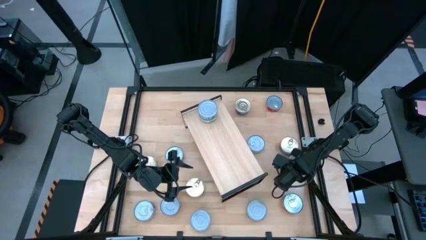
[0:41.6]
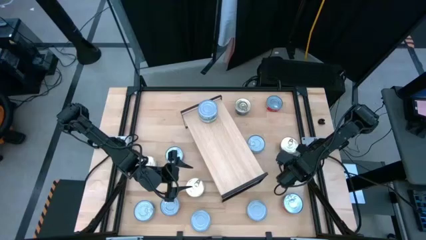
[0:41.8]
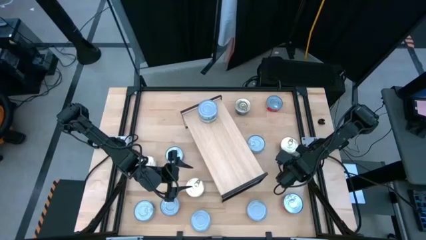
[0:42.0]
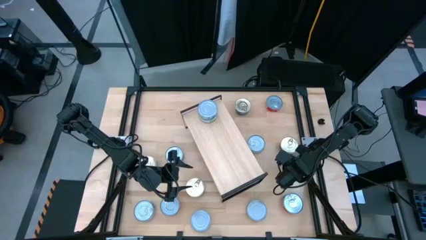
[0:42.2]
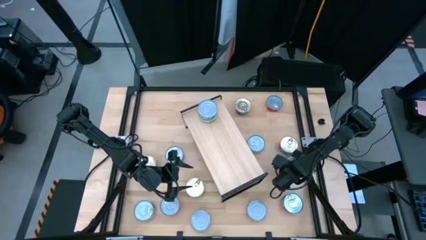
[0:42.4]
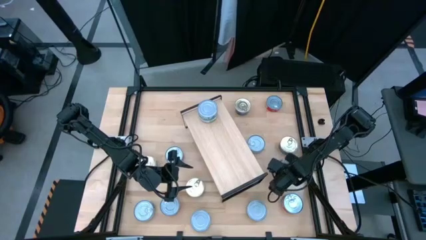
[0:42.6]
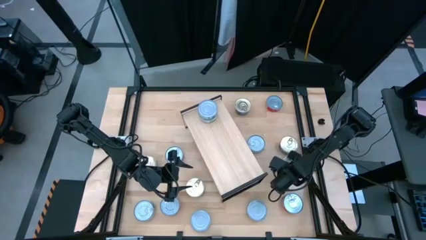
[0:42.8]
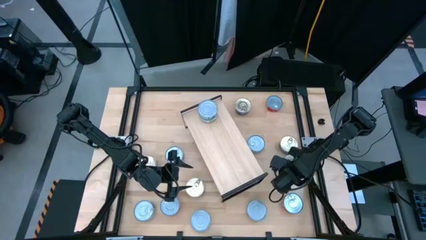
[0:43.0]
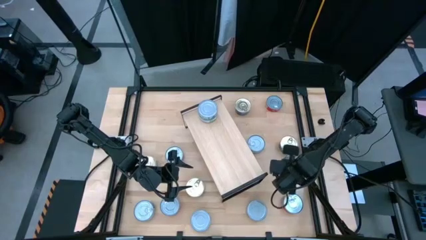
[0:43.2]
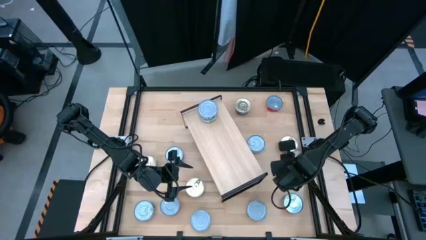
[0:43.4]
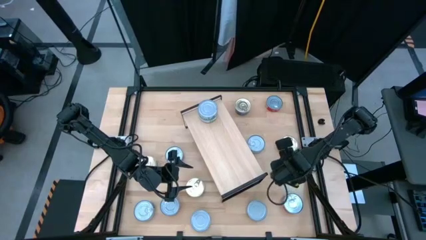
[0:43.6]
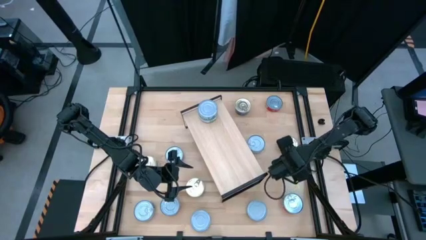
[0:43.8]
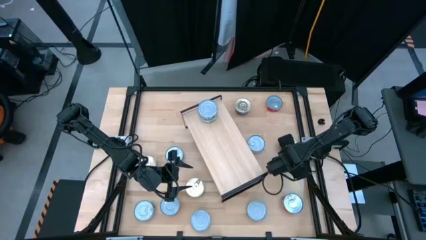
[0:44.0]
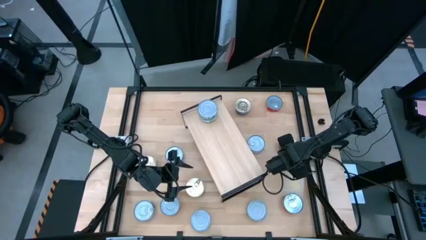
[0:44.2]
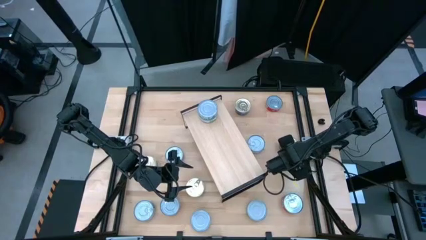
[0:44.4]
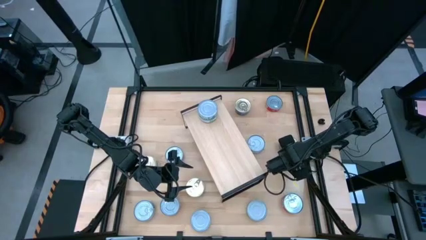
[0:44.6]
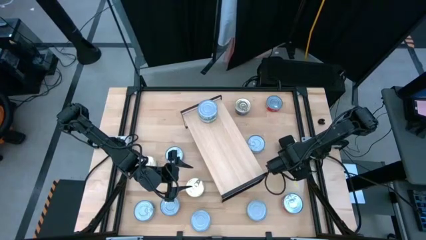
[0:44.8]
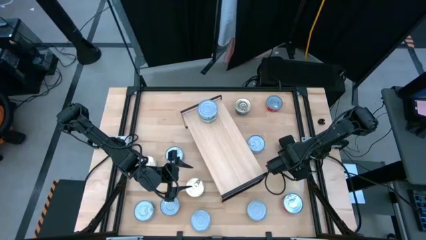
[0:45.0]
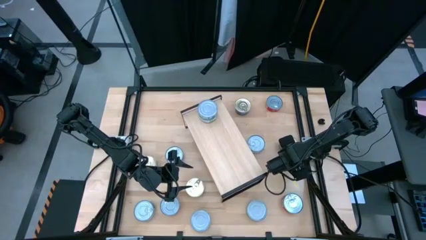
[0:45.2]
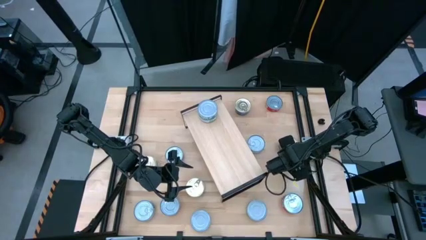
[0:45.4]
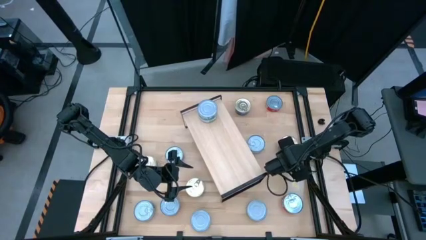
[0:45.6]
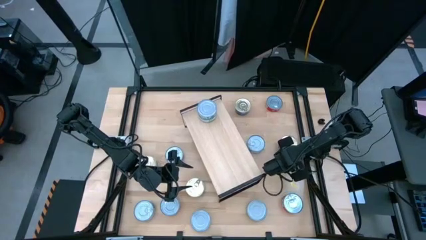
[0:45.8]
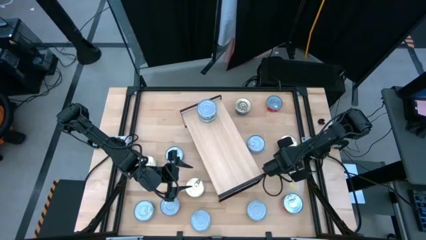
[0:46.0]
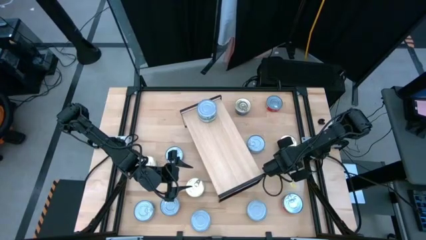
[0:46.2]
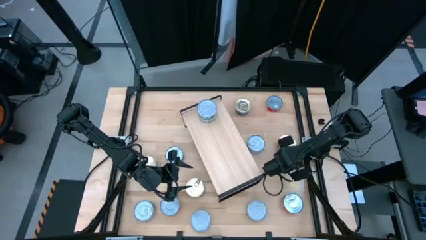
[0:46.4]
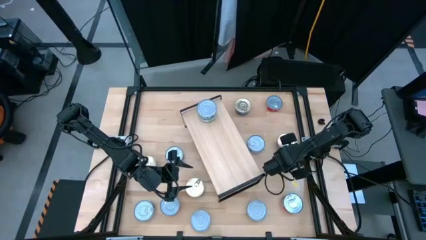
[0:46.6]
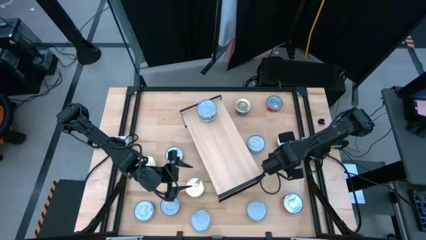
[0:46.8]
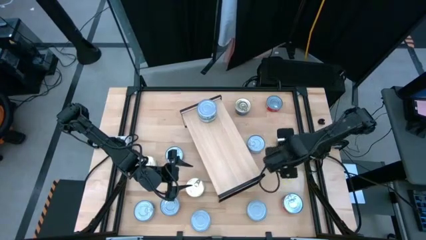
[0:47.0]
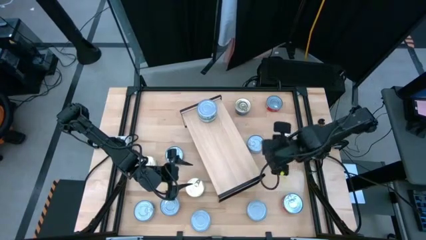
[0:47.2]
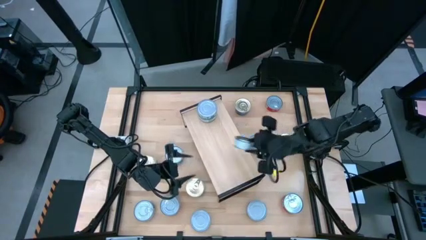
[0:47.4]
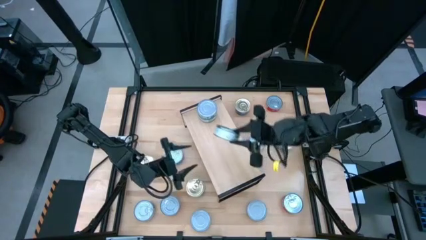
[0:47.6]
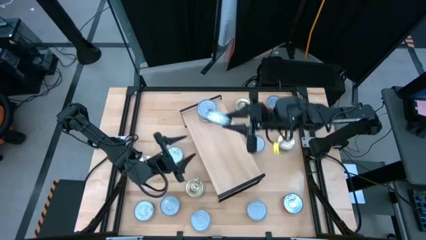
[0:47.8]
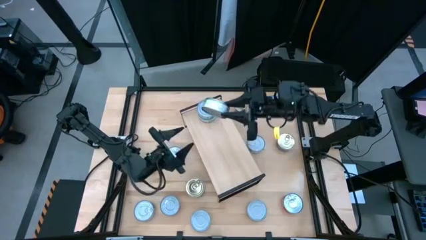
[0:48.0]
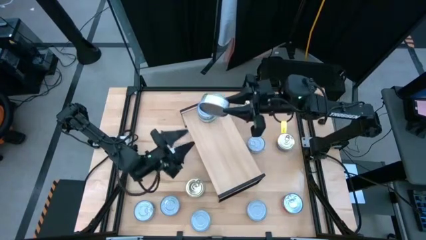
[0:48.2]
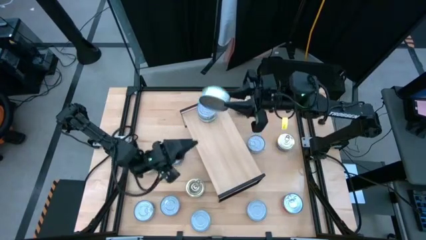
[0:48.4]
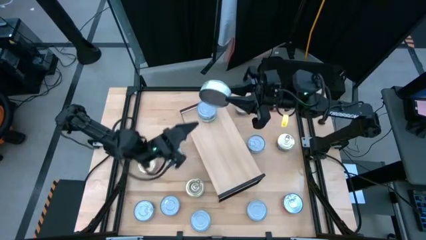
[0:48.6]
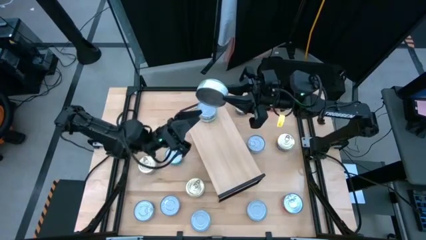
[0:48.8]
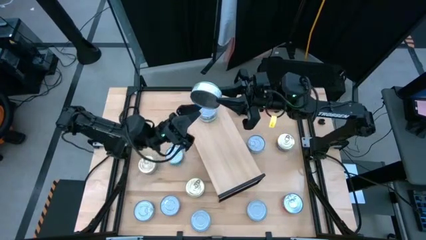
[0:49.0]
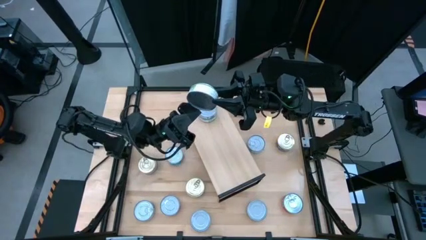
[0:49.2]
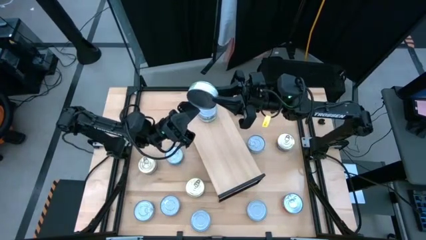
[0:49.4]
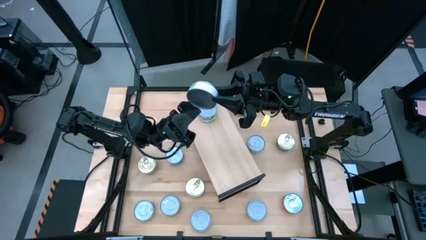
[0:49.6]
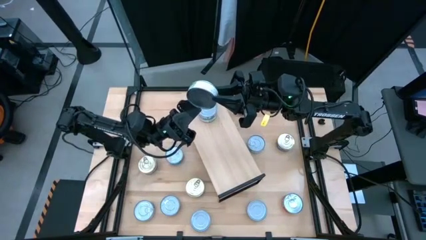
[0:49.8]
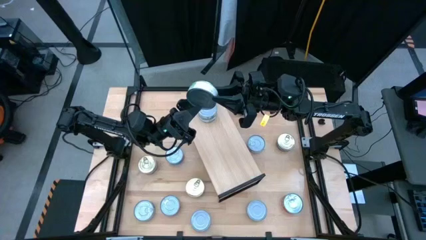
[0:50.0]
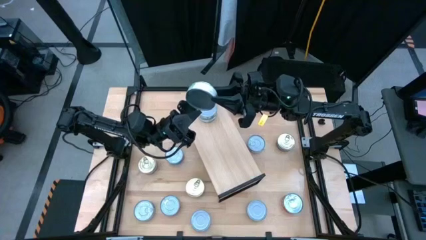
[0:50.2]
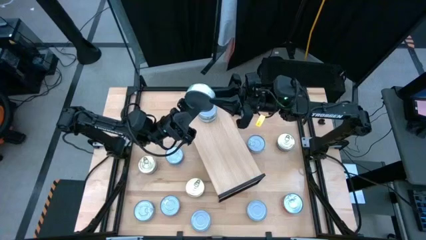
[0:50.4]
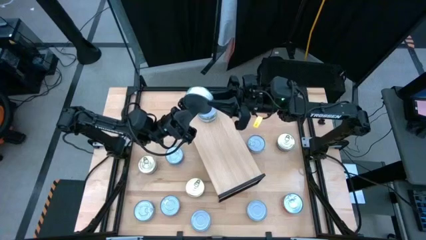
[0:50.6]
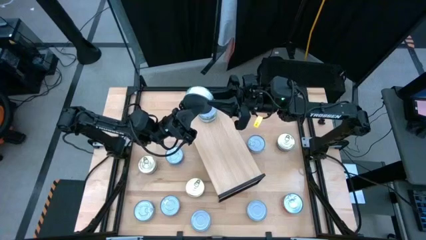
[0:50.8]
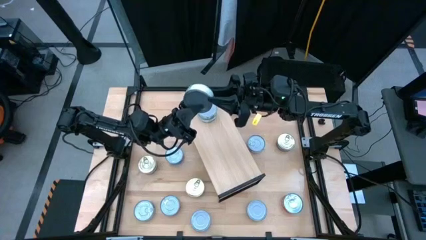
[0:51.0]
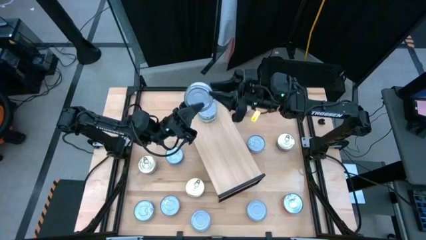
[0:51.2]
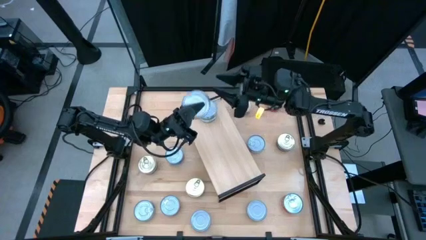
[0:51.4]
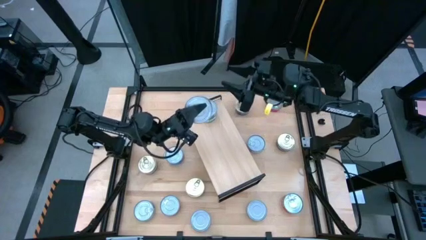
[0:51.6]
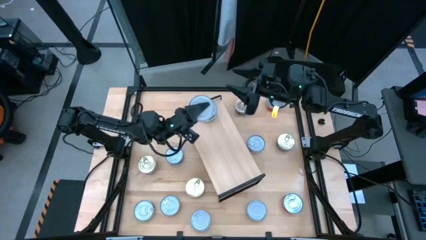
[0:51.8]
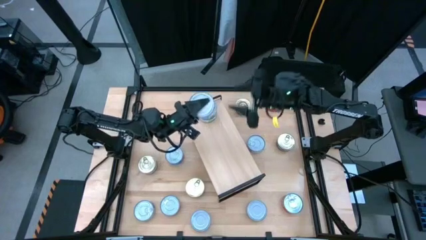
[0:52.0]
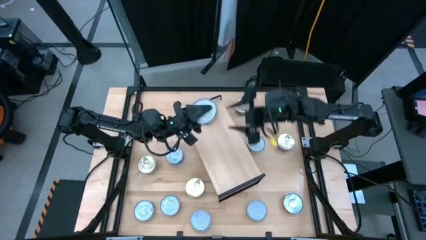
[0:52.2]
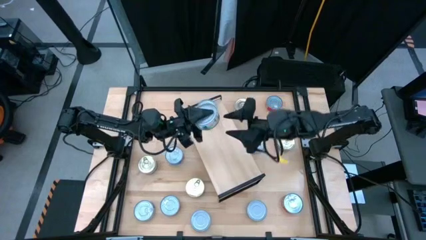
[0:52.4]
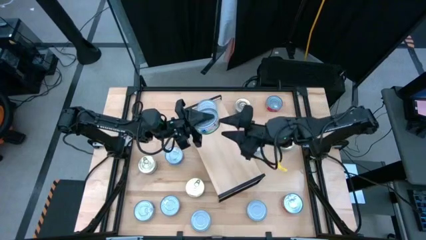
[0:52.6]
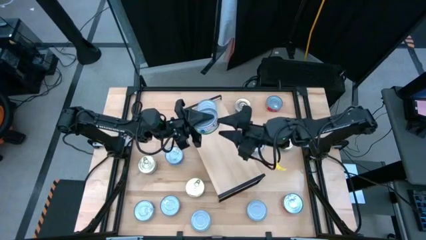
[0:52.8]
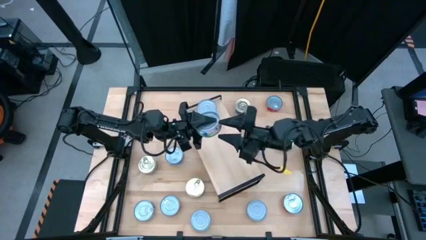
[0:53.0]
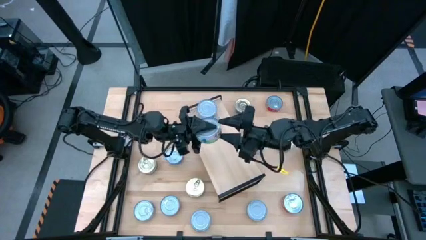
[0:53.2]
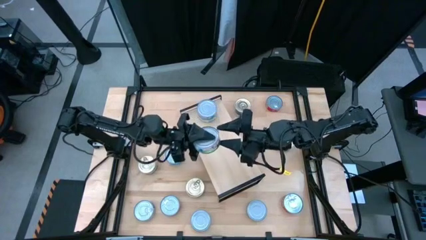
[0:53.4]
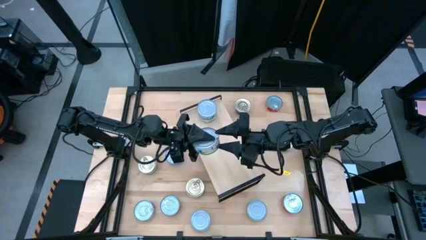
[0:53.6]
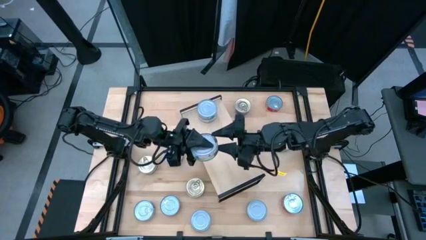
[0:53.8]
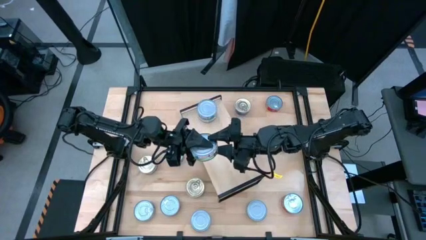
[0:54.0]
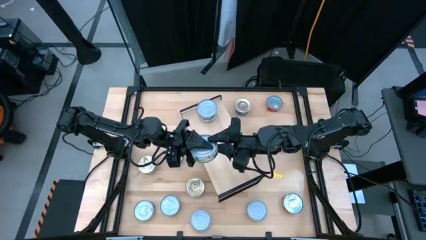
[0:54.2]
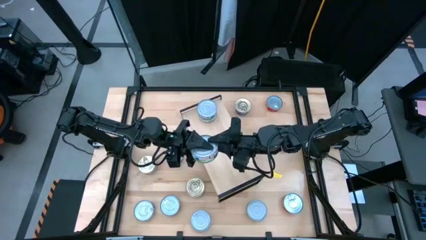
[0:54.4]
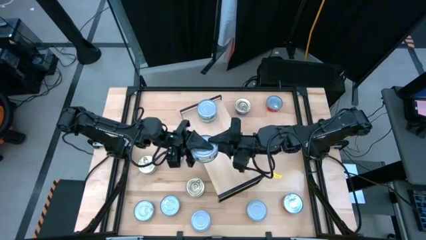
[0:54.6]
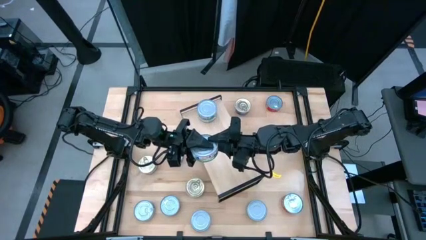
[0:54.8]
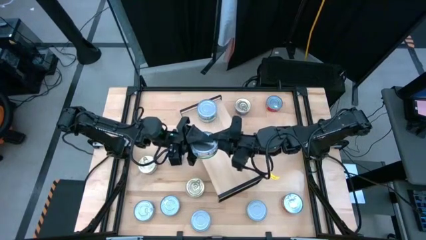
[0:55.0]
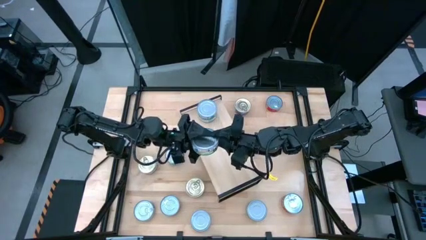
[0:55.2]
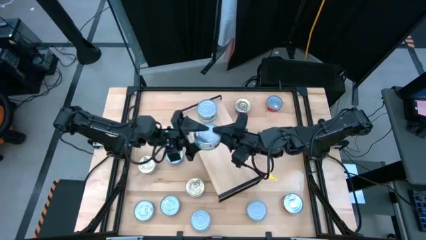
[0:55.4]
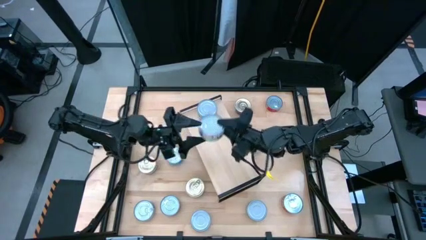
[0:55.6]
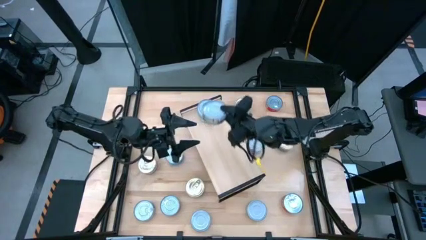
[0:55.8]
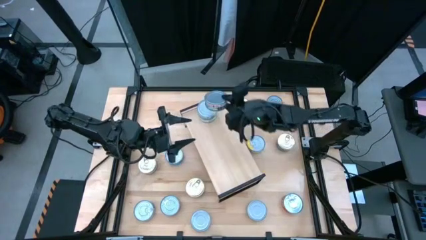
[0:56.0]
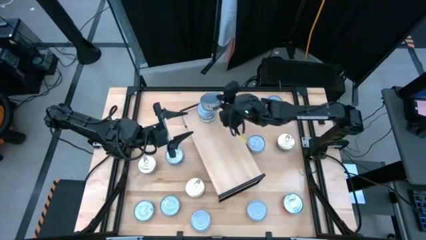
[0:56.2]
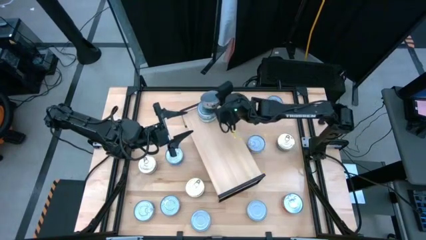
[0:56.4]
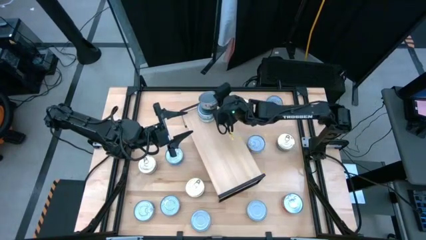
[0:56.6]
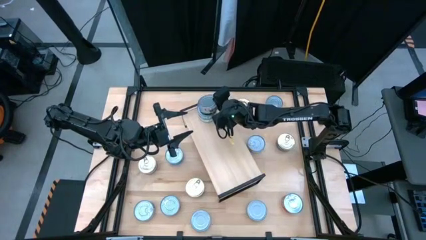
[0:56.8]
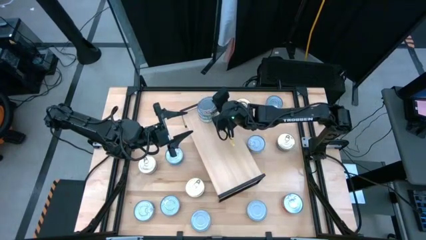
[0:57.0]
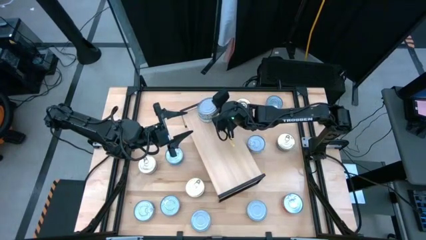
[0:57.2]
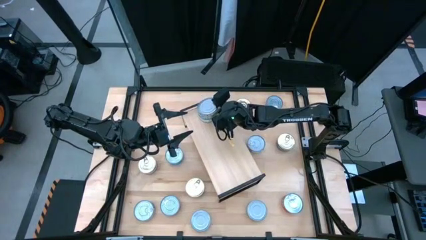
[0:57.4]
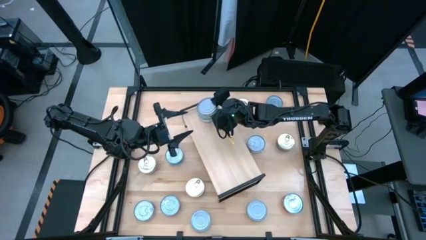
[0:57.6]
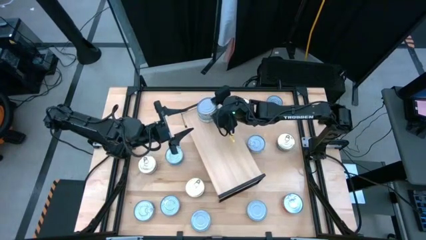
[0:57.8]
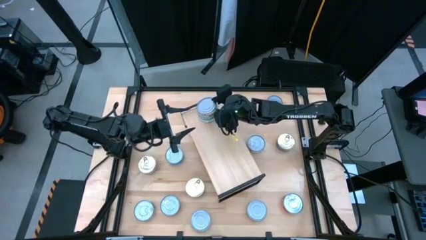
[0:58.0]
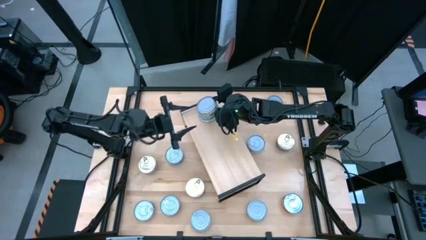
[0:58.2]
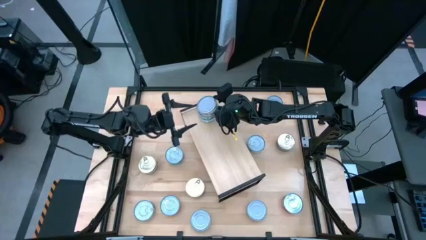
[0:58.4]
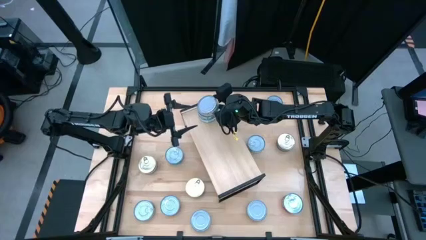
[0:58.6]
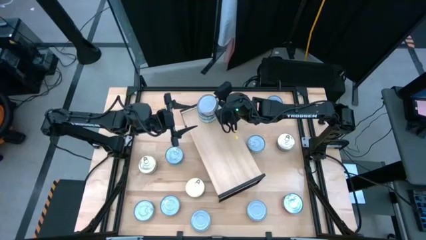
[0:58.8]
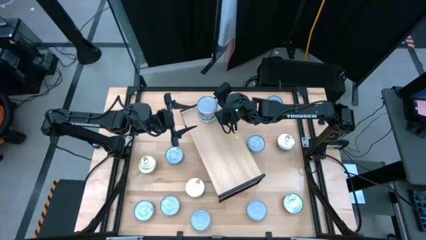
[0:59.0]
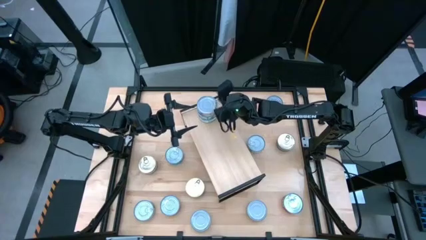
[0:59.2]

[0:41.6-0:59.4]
Task: Stack canned seafood by type on shelf
Stack the green tuna can on top of the other tuna can on the shelf
